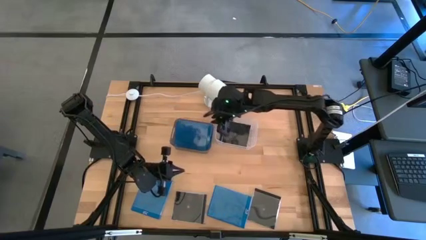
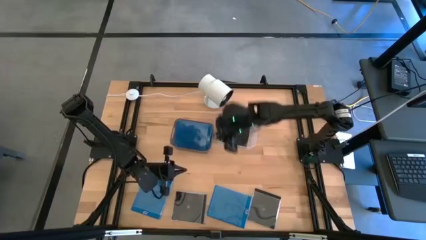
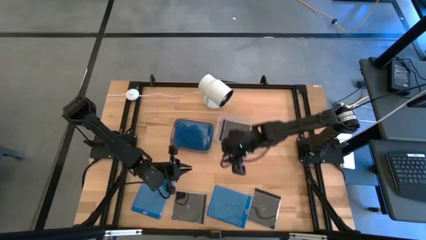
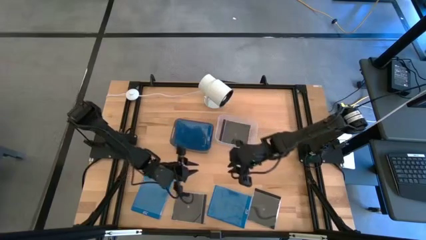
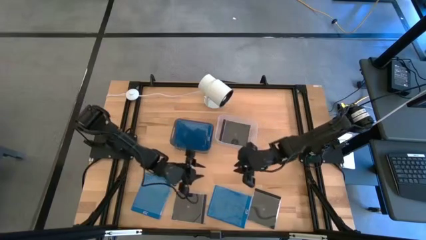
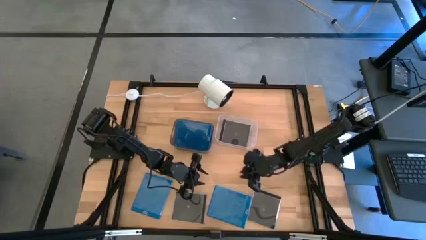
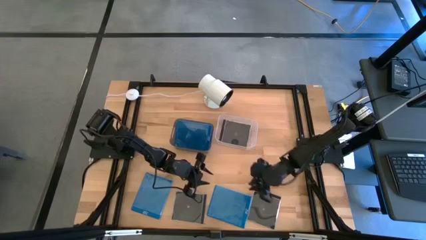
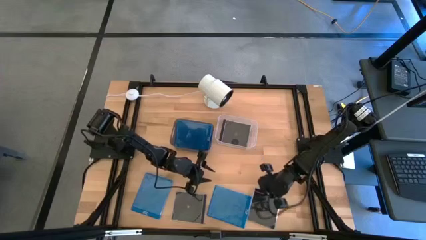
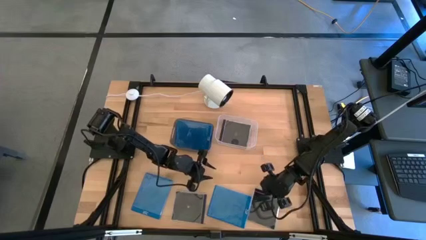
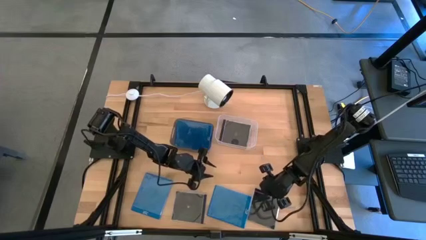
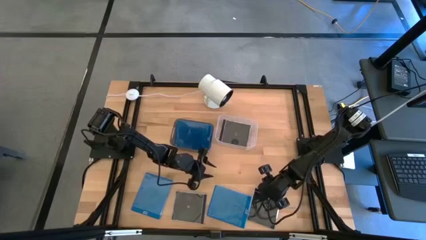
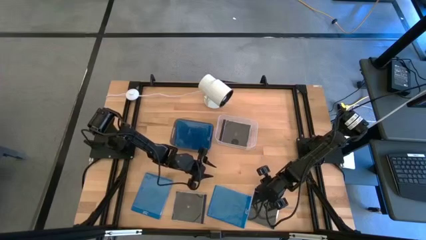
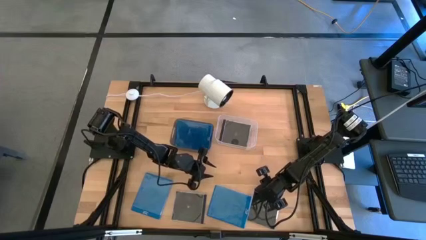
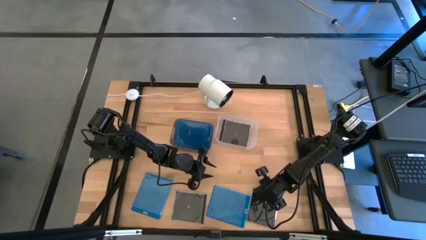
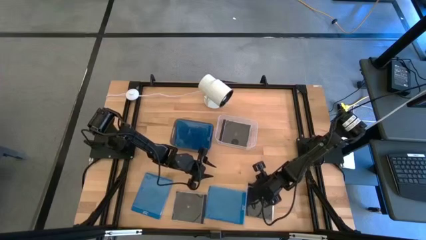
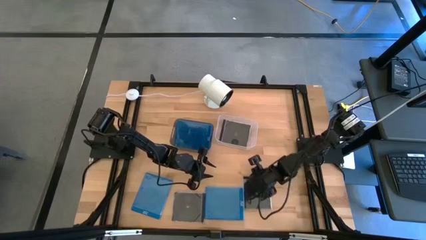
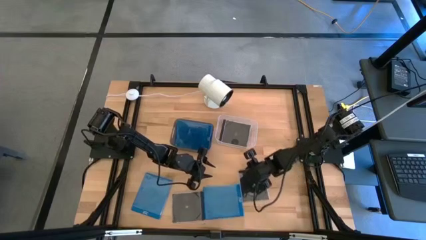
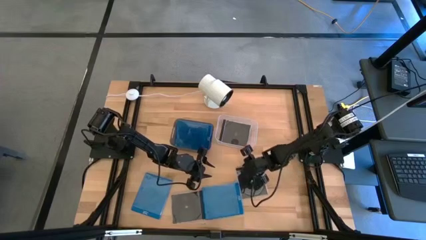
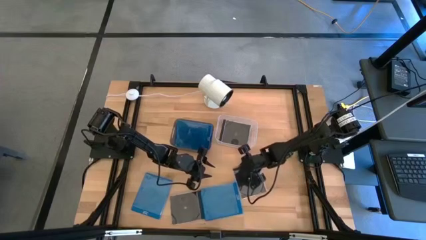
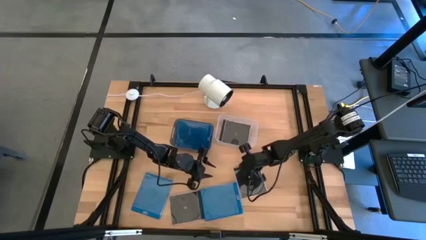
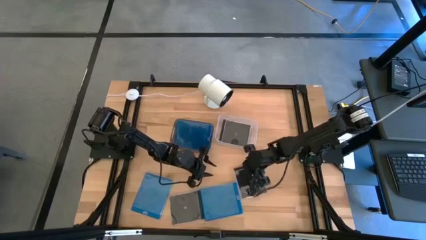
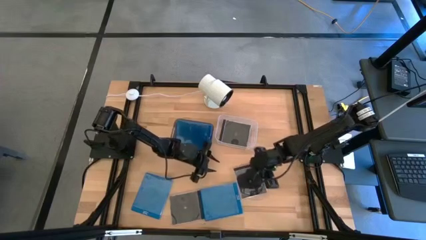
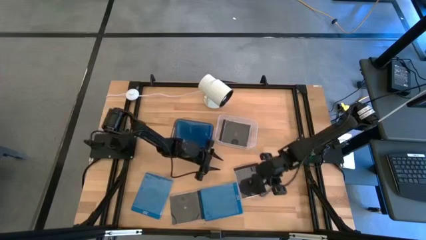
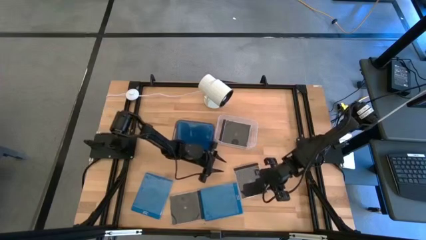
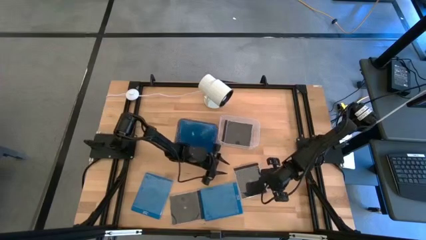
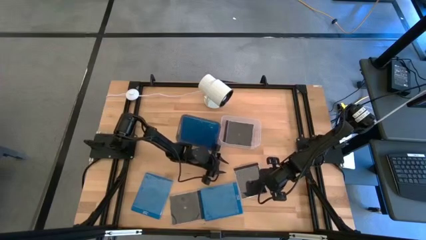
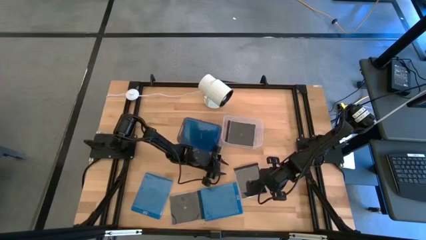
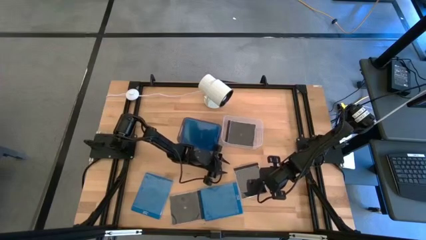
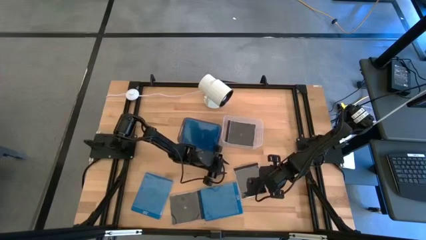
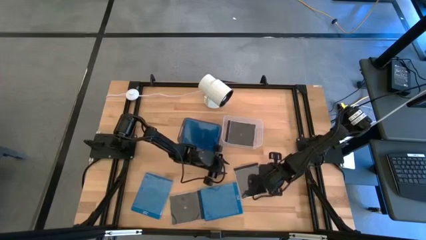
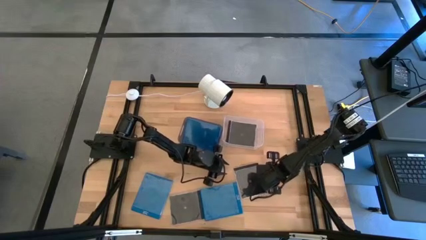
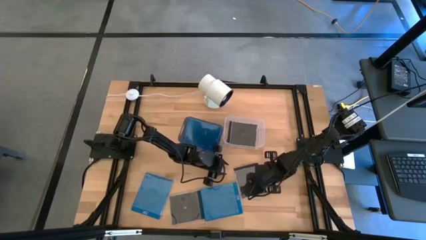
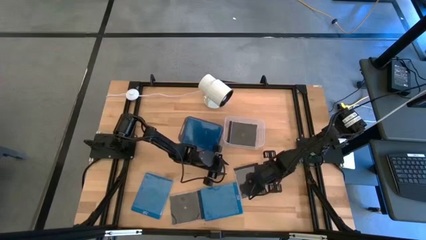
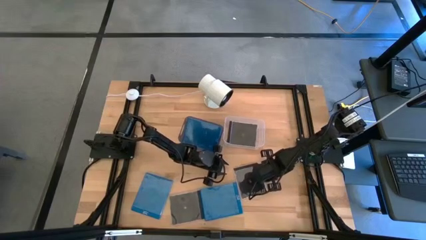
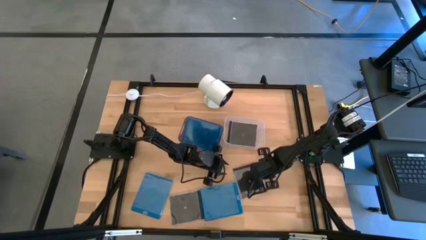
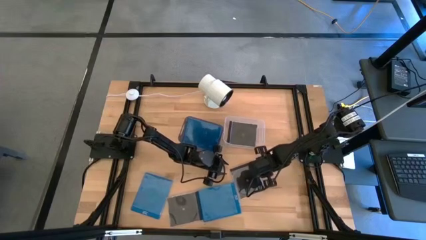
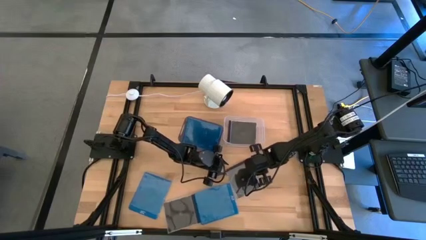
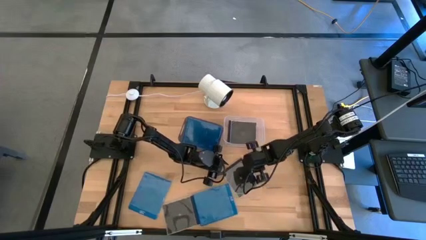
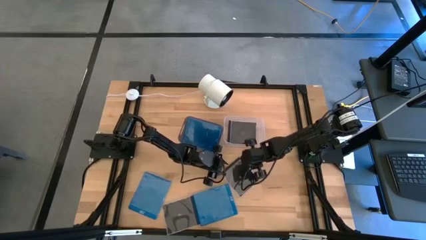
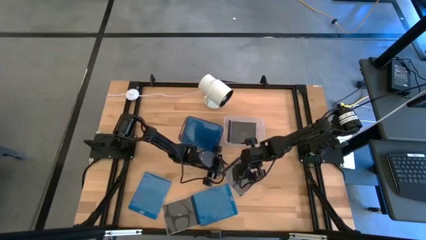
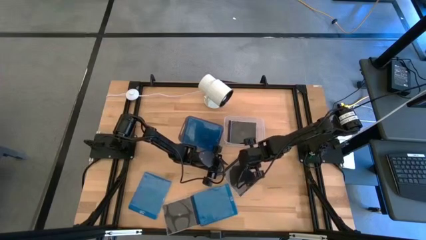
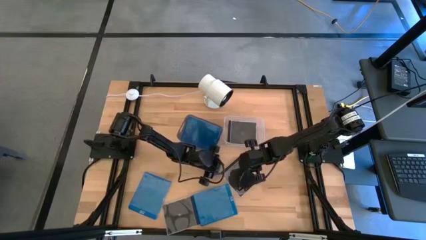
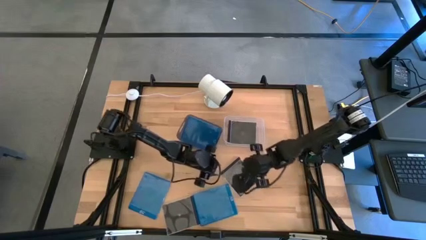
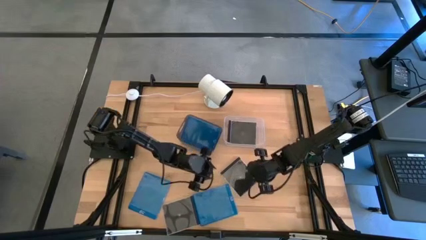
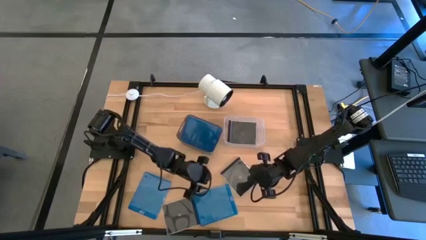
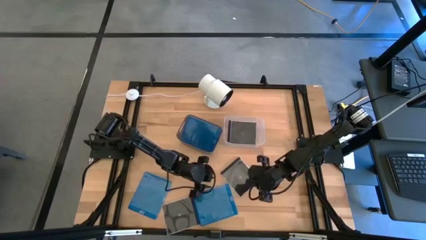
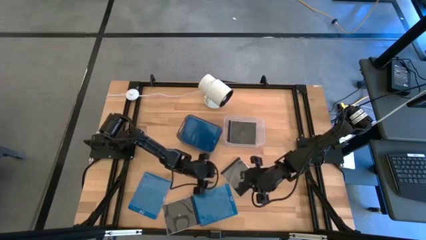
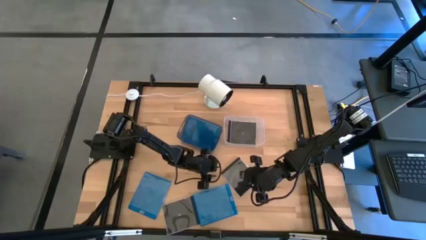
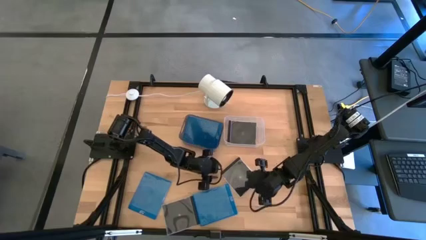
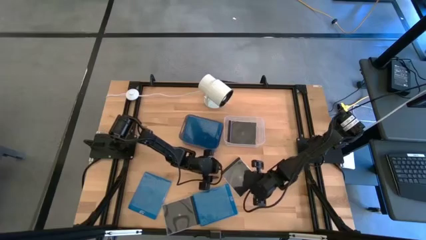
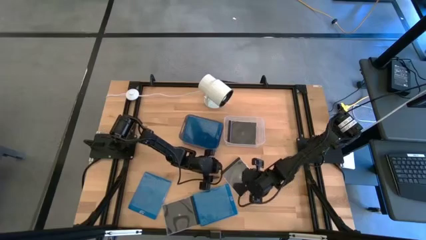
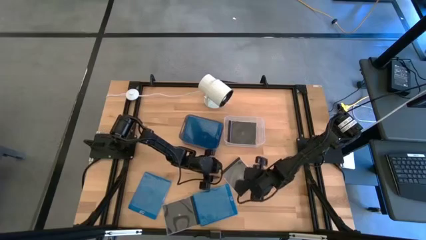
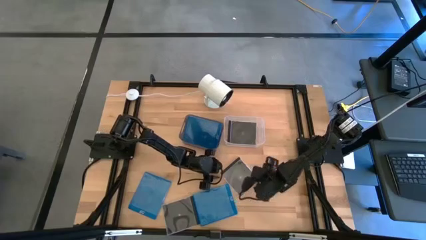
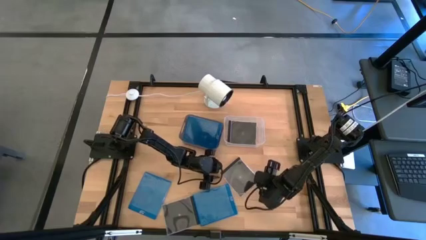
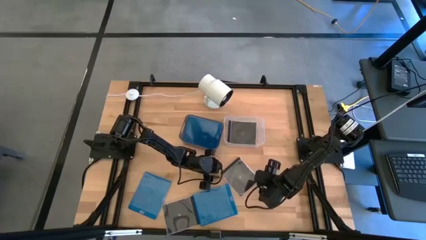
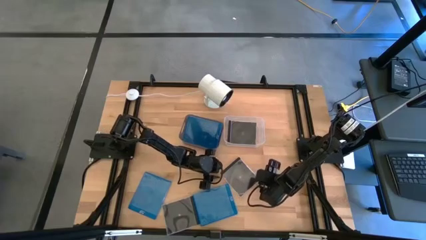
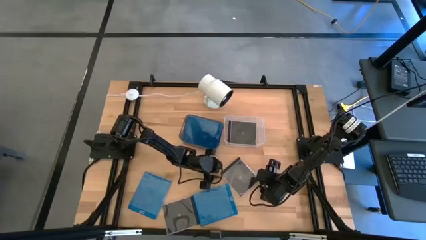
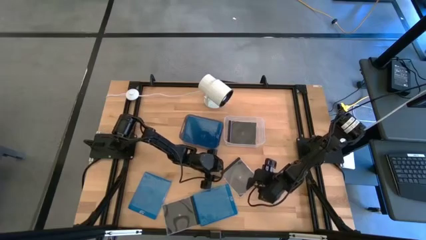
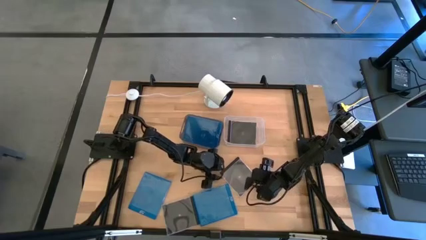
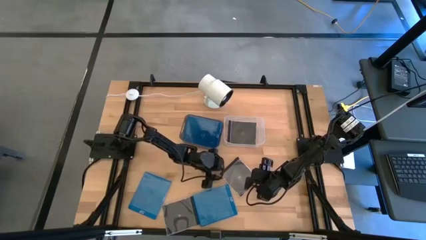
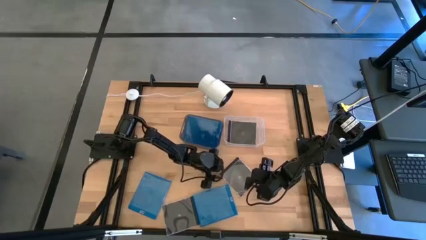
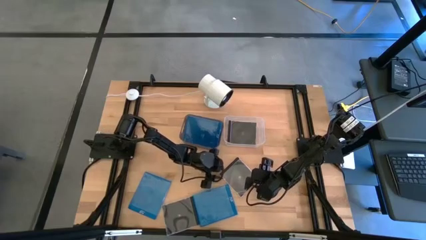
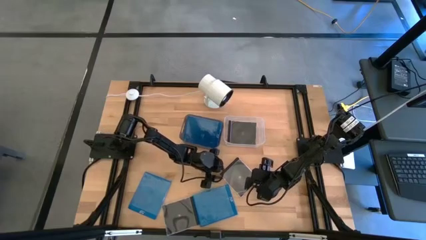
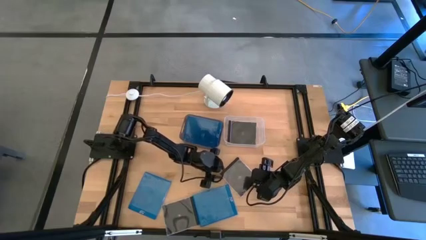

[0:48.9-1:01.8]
Task: Pick & place jewel cases by type
Put the right black cd case into the transparent bin
